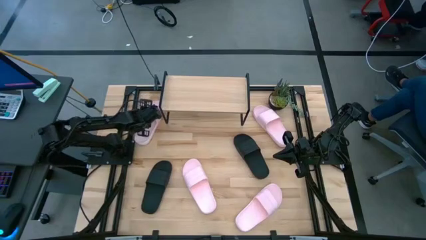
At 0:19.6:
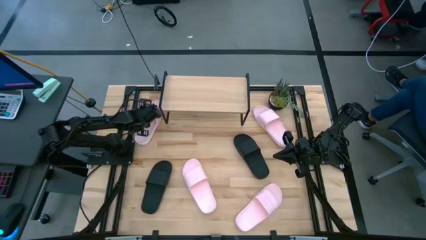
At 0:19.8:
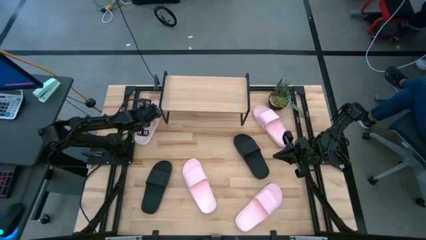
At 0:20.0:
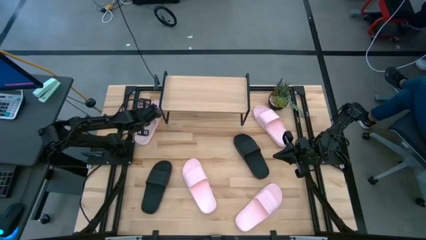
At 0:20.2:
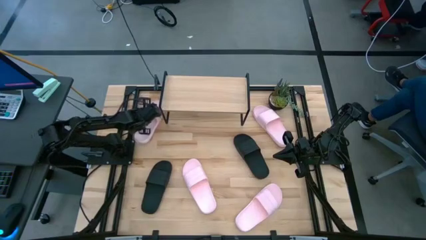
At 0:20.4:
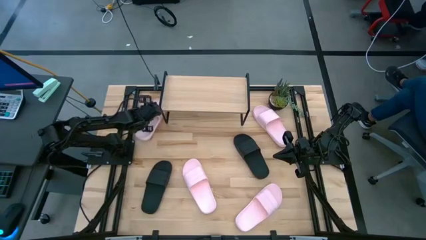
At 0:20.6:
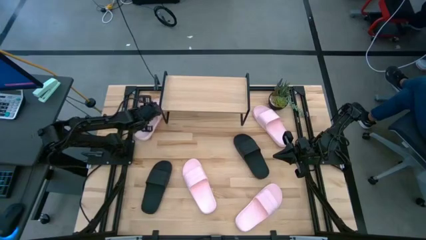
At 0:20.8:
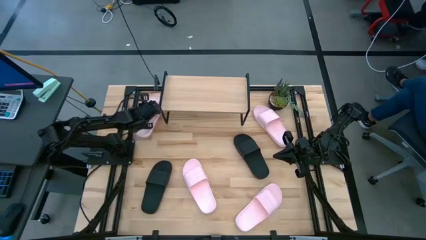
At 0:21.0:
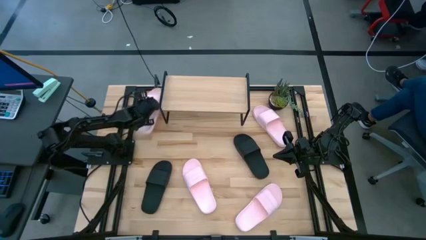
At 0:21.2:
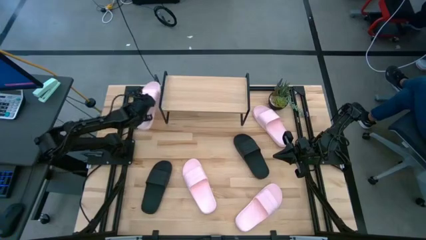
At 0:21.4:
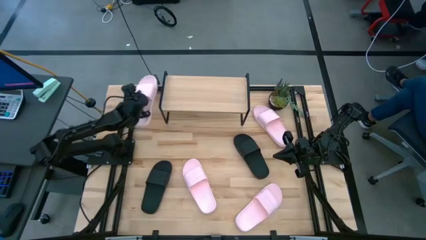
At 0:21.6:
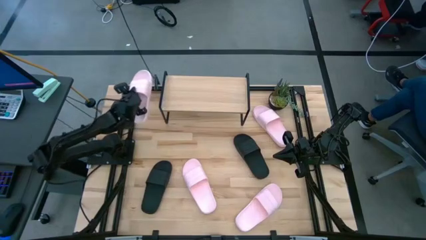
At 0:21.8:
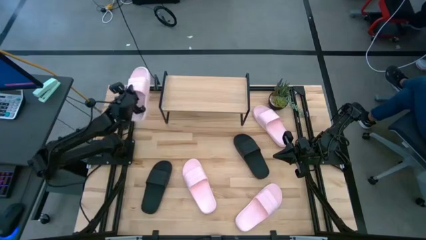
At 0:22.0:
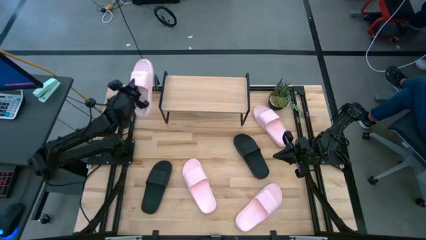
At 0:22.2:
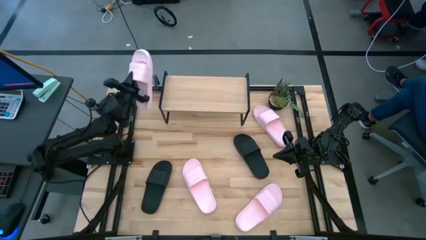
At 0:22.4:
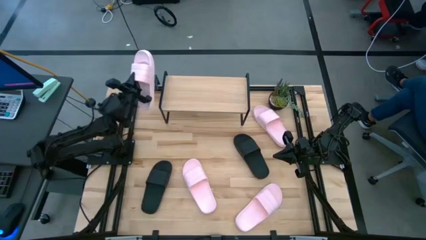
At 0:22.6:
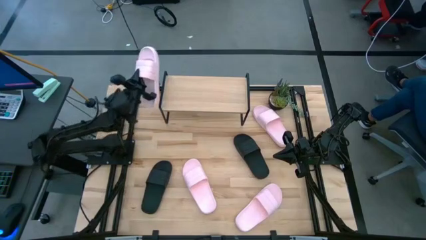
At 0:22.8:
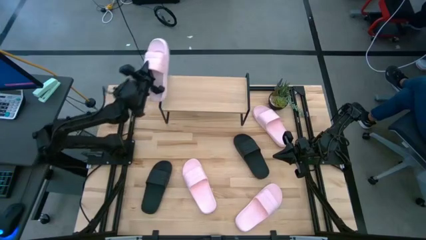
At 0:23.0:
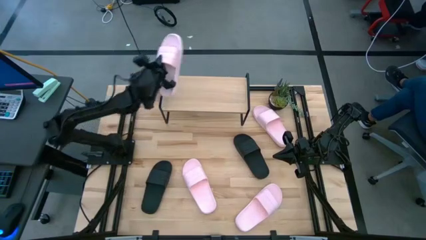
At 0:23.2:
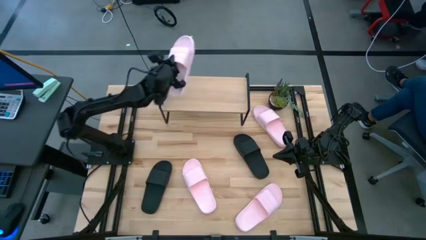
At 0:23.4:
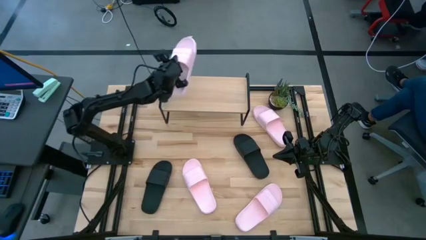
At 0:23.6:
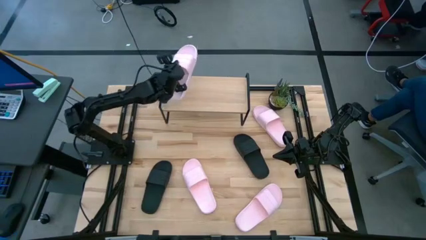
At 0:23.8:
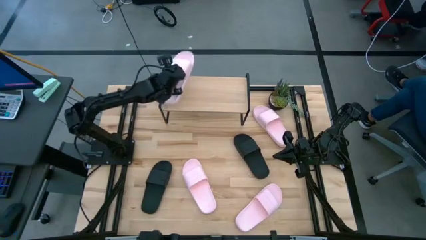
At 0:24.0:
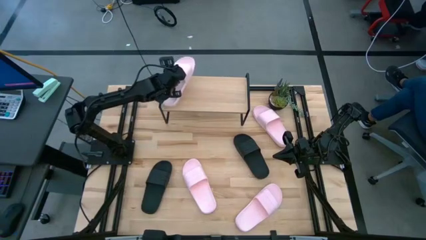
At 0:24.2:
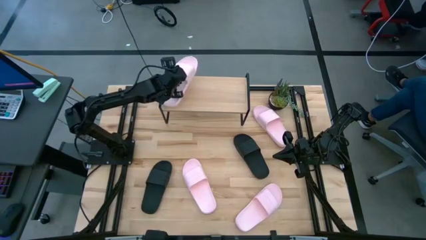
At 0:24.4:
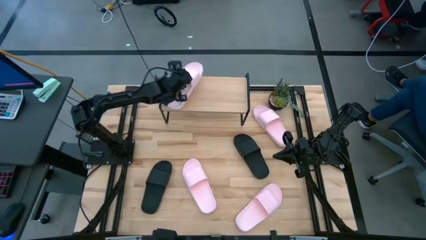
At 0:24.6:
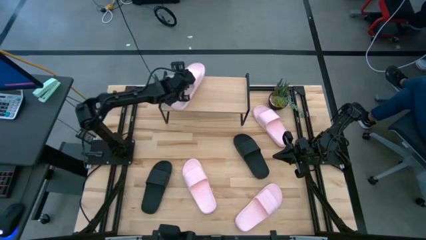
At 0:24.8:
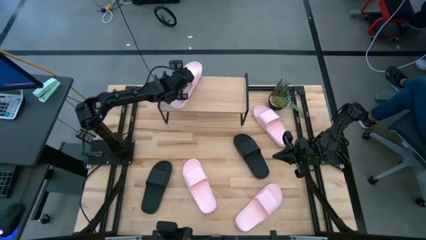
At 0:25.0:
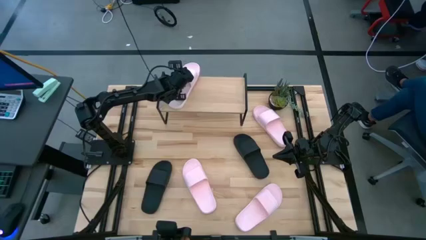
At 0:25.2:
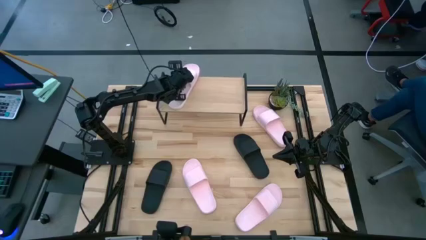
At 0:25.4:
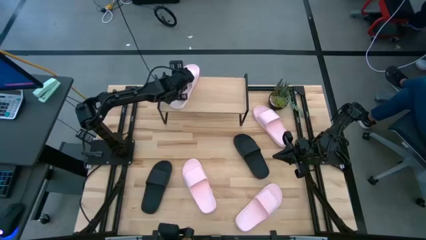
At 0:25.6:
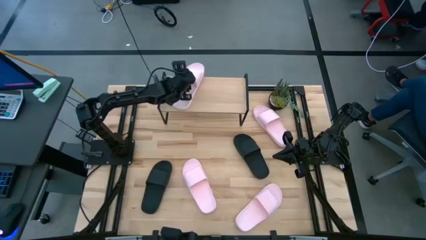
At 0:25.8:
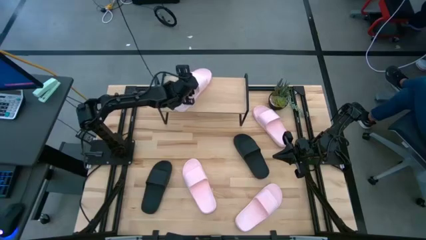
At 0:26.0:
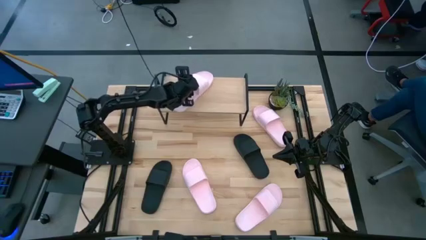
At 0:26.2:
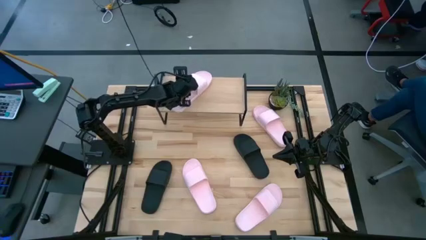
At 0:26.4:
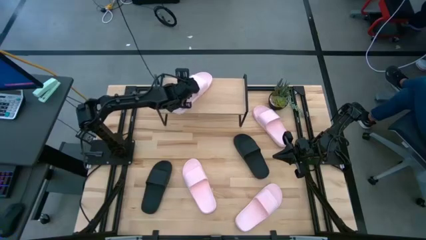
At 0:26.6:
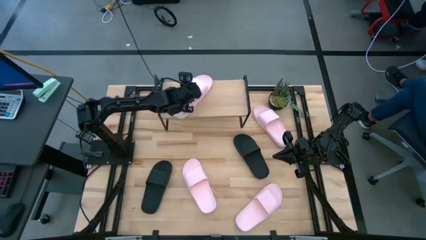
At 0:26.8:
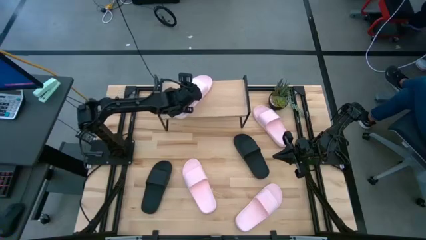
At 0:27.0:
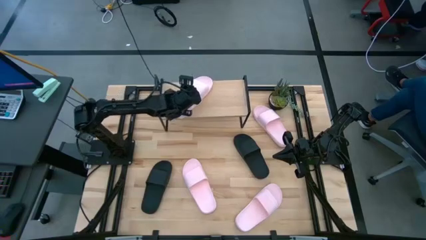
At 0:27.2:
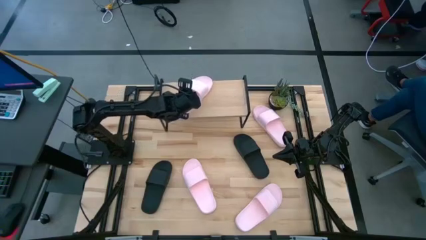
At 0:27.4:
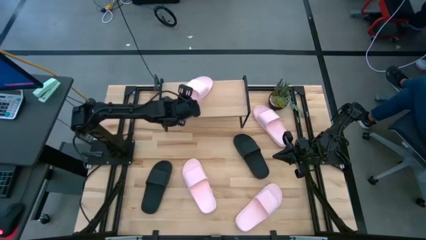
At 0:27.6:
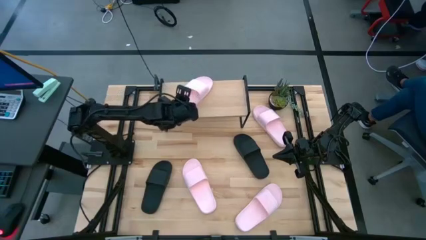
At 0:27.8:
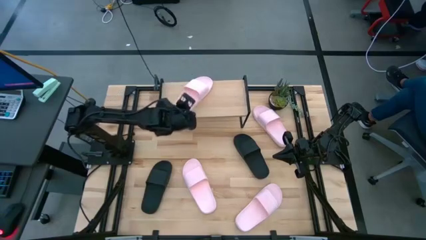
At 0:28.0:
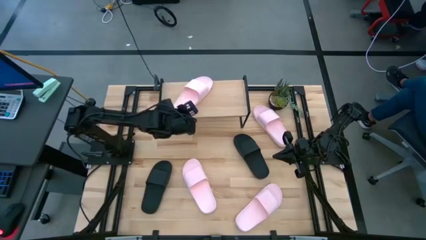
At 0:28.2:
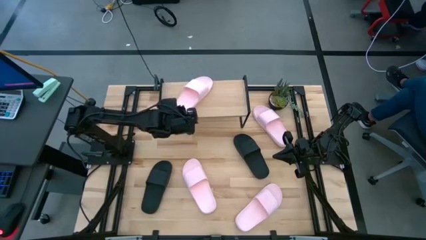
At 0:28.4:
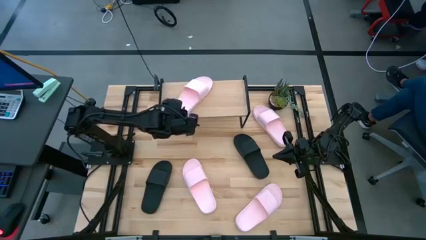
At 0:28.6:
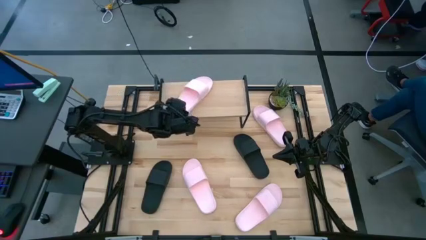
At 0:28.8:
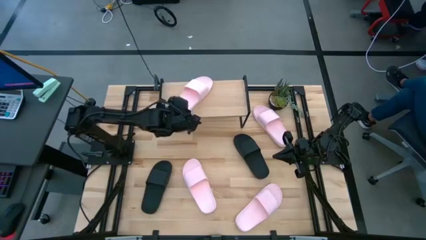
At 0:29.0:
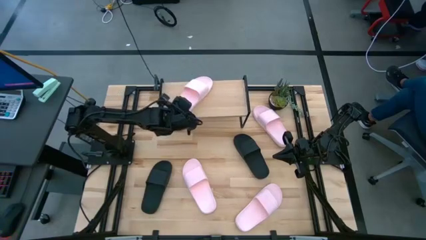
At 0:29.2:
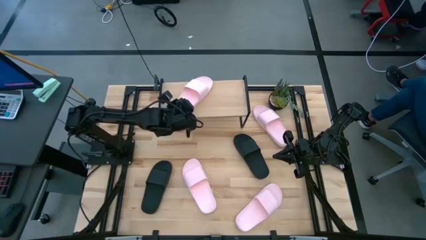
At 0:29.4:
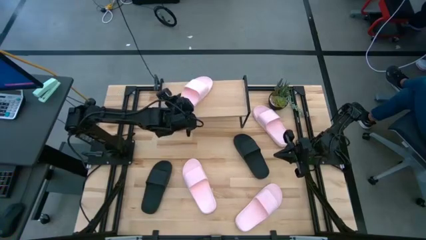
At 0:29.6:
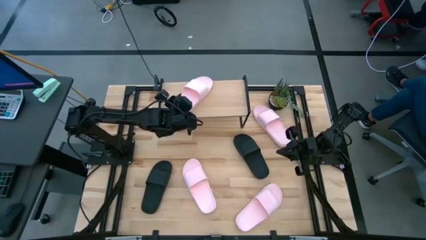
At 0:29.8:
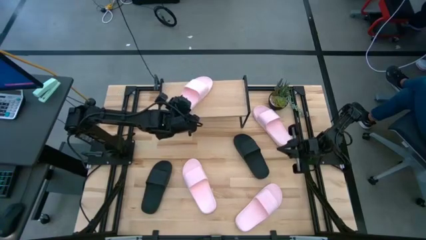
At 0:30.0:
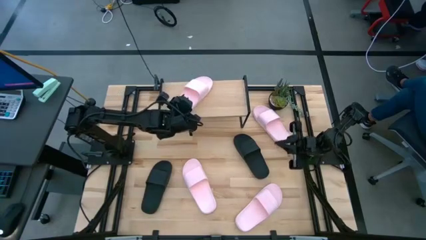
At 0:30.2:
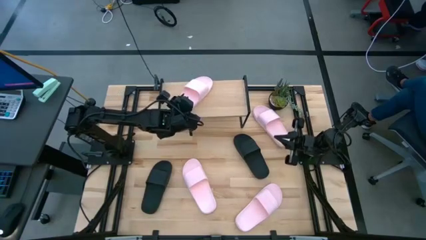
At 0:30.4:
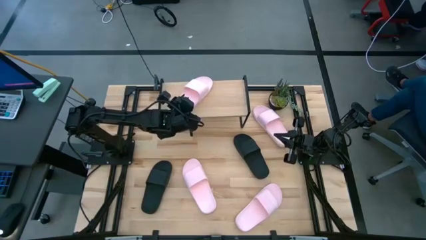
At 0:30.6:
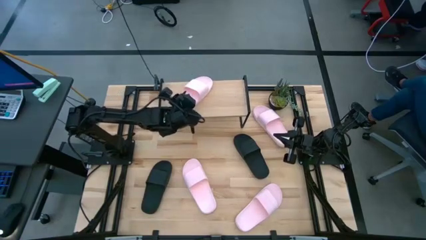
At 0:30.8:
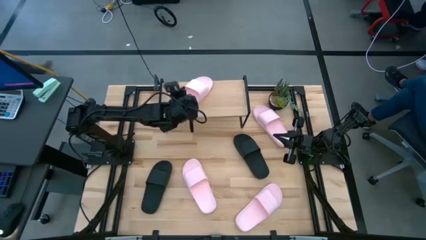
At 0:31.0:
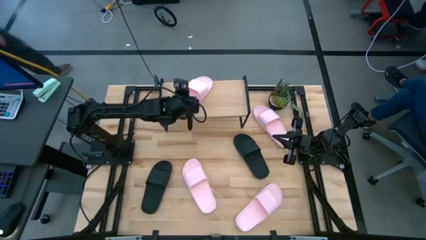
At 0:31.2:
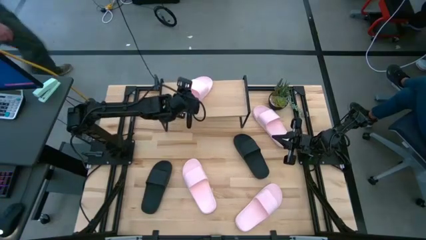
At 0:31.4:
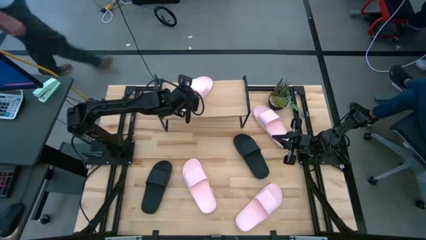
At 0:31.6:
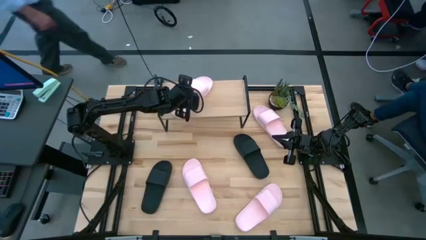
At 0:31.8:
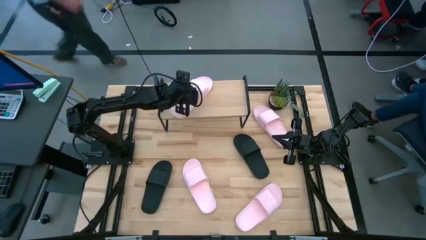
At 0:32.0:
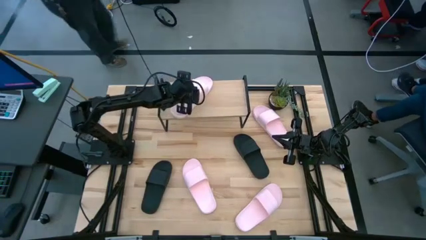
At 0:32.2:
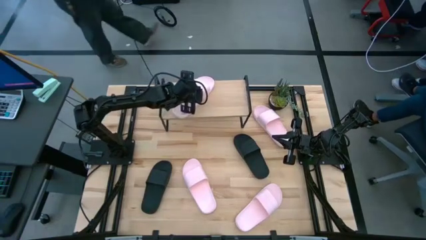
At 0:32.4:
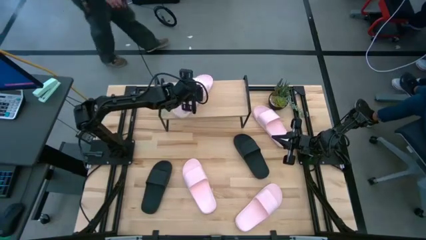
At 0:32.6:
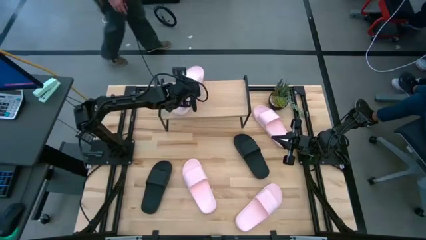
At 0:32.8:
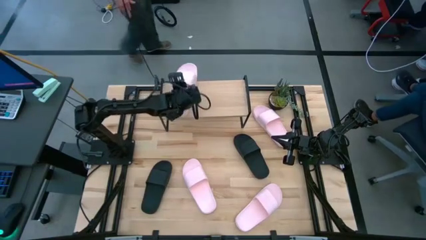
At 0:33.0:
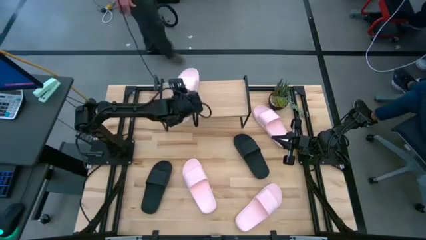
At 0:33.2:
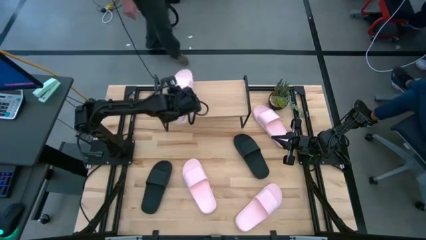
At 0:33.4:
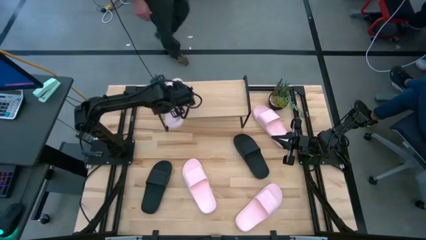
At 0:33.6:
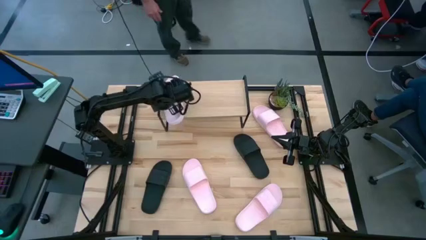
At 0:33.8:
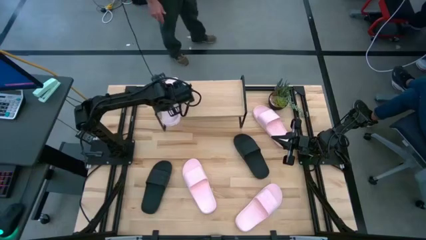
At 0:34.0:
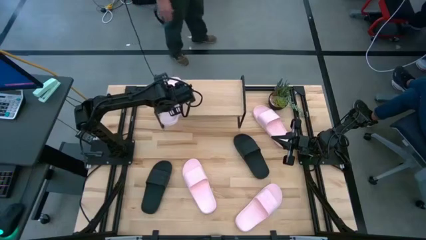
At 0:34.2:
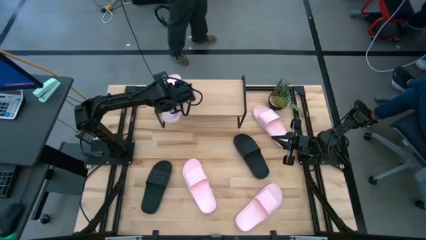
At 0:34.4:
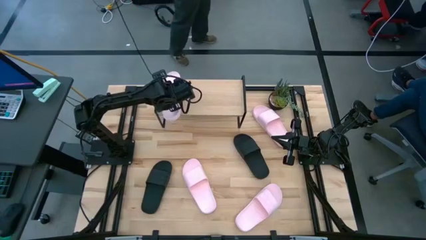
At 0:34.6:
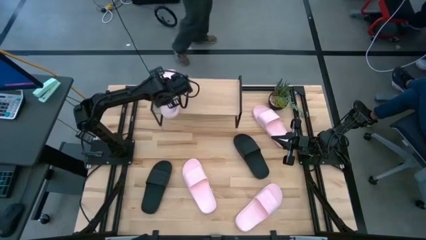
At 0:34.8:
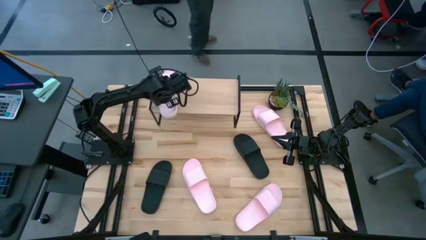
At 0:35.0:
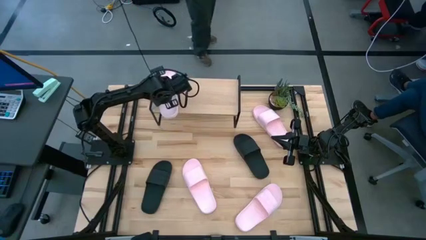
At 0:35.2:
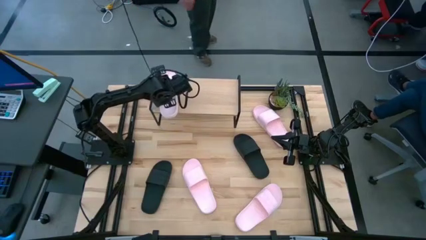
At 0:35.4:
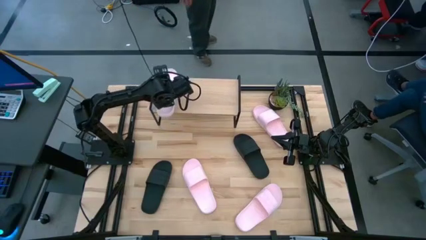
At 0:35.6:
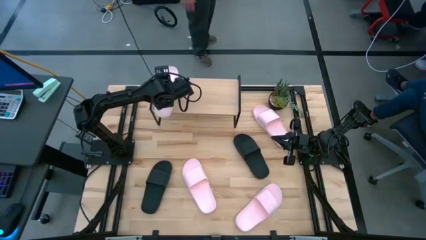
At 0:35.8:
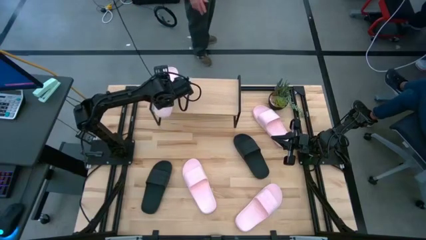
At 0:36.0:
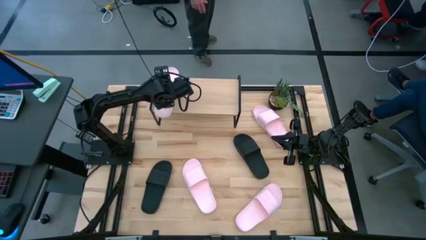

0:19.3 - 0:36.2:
Task: Pick and place slides into the shelf
Put the top left pink slide on the shelf
